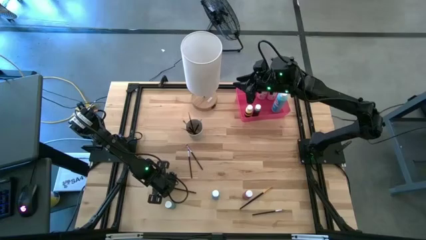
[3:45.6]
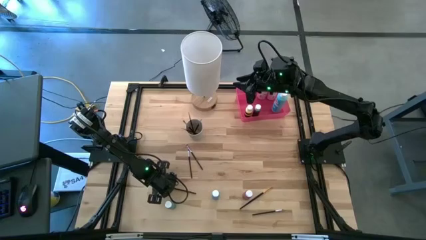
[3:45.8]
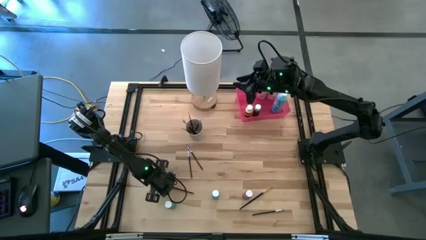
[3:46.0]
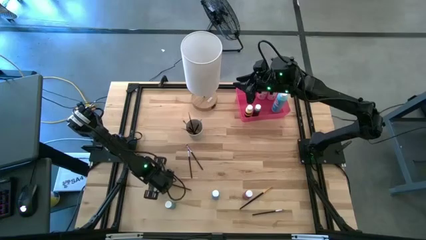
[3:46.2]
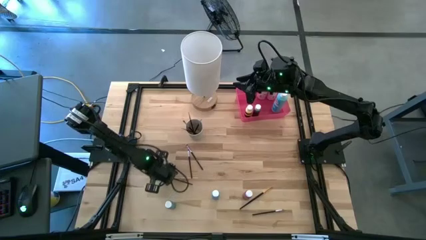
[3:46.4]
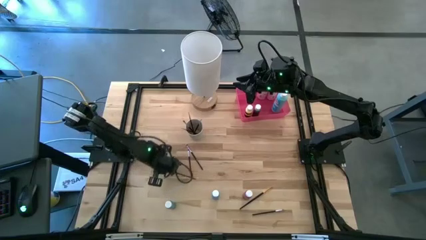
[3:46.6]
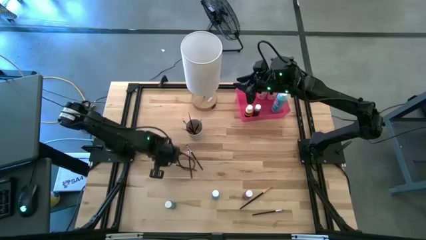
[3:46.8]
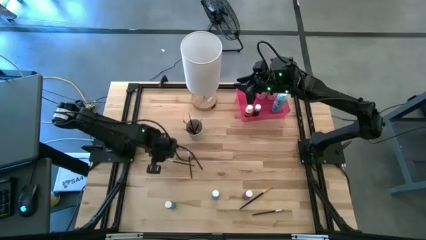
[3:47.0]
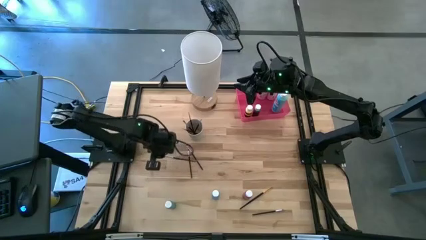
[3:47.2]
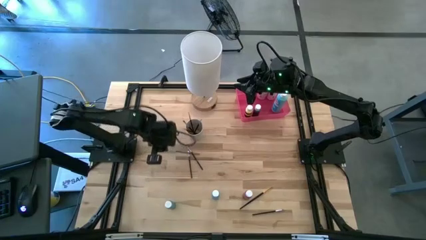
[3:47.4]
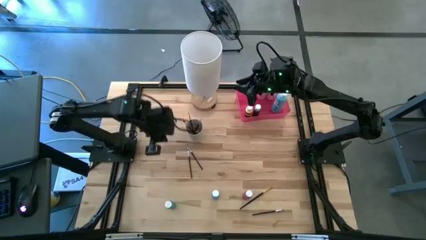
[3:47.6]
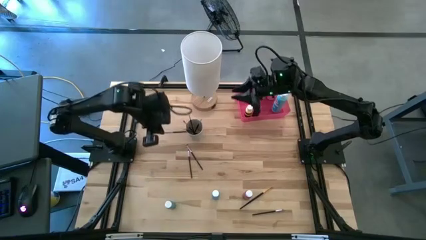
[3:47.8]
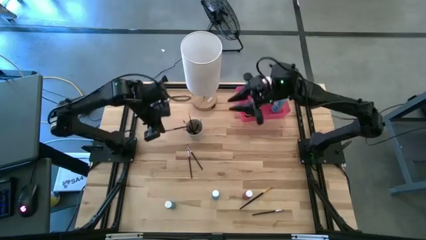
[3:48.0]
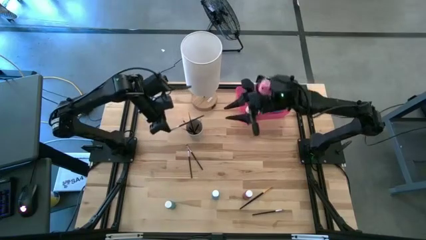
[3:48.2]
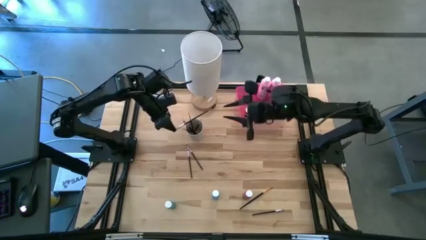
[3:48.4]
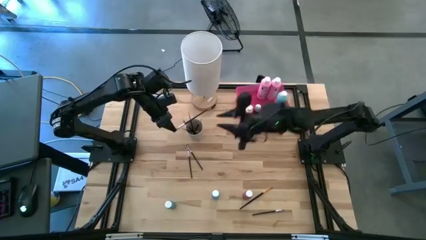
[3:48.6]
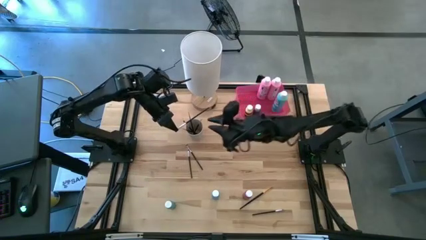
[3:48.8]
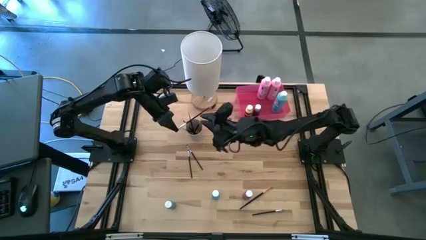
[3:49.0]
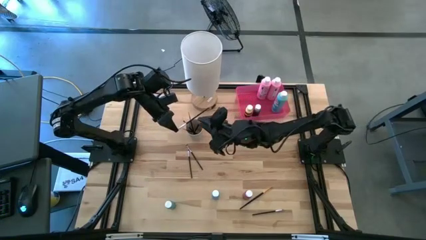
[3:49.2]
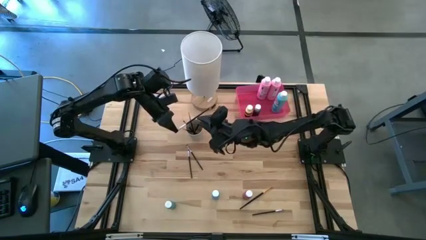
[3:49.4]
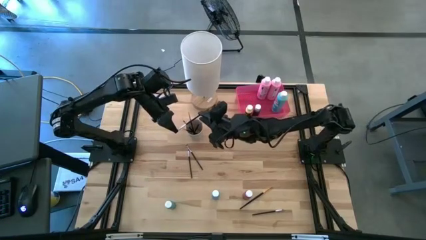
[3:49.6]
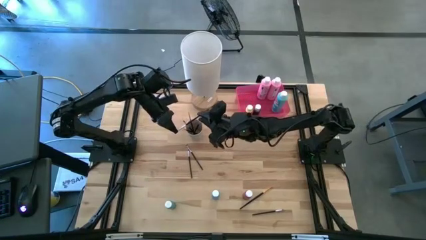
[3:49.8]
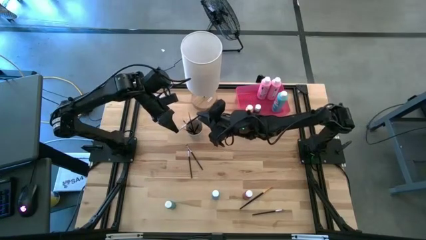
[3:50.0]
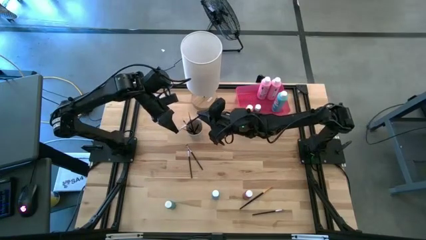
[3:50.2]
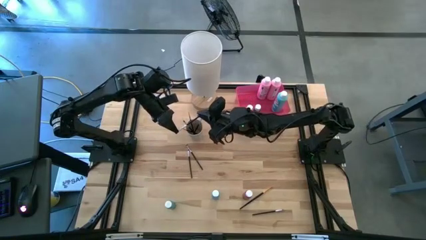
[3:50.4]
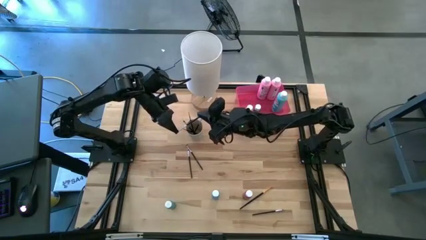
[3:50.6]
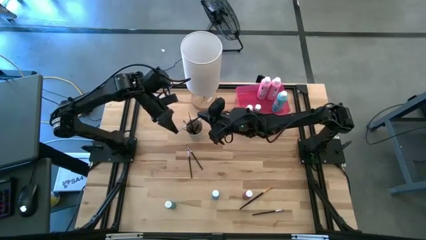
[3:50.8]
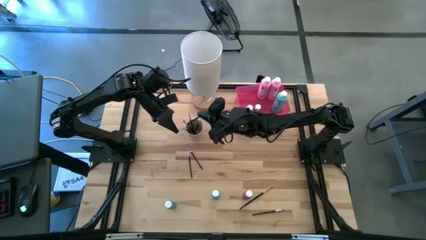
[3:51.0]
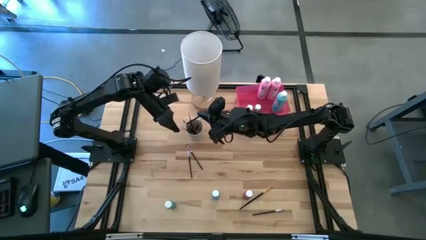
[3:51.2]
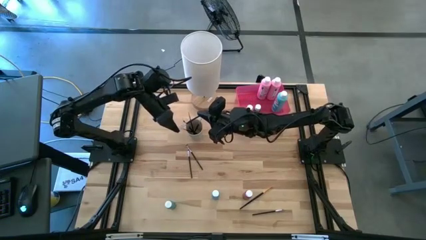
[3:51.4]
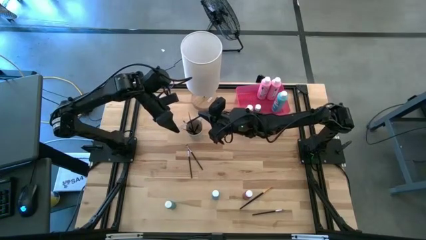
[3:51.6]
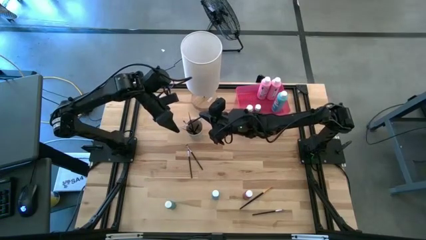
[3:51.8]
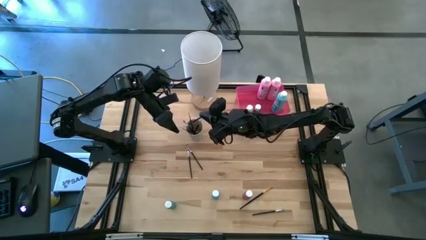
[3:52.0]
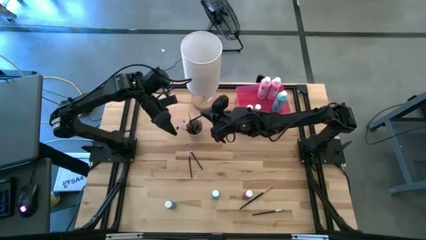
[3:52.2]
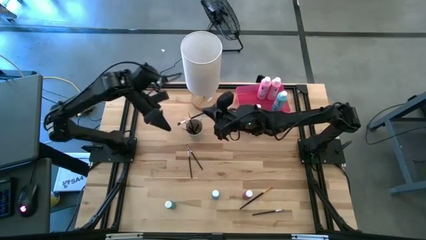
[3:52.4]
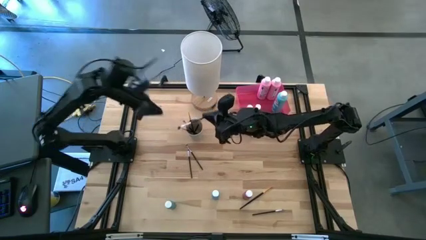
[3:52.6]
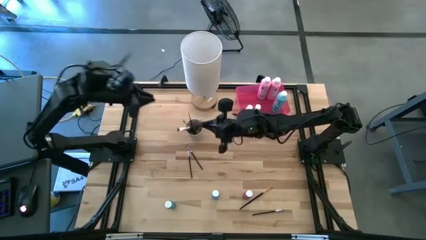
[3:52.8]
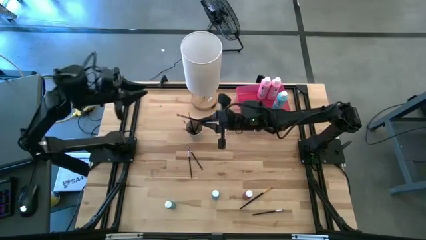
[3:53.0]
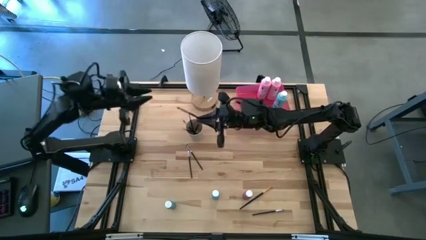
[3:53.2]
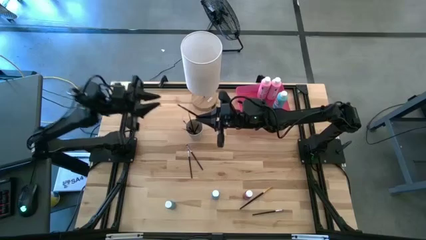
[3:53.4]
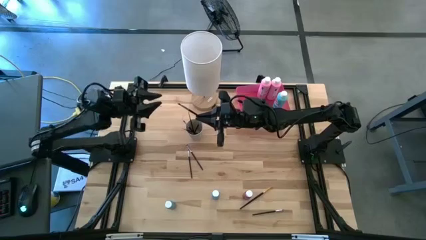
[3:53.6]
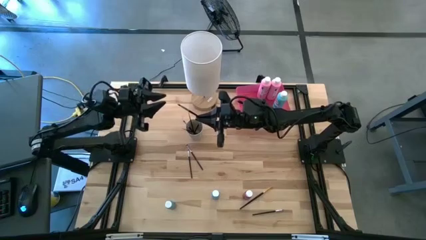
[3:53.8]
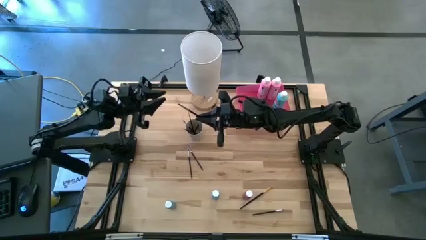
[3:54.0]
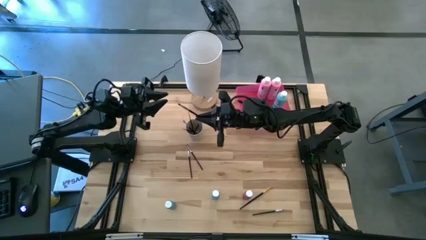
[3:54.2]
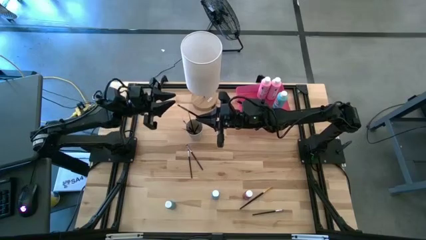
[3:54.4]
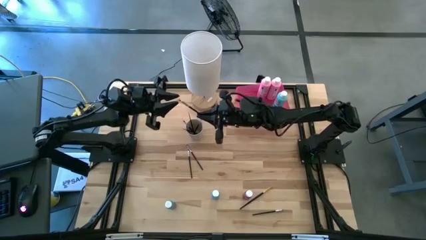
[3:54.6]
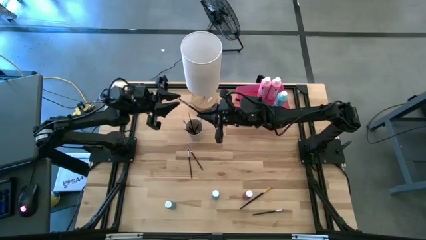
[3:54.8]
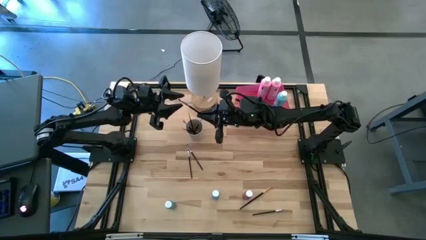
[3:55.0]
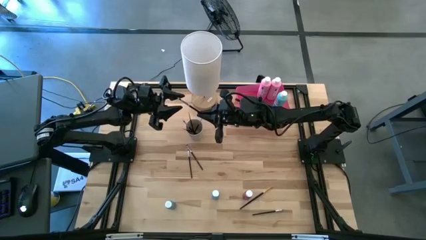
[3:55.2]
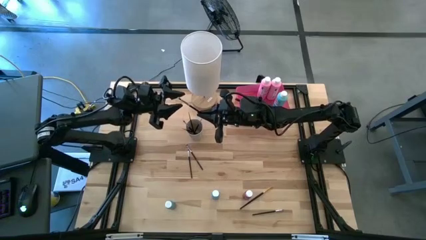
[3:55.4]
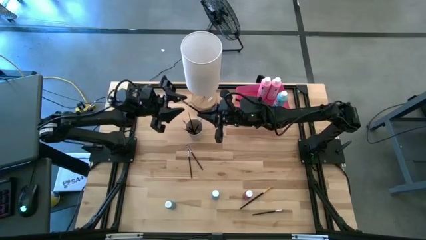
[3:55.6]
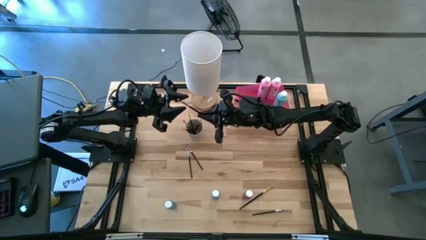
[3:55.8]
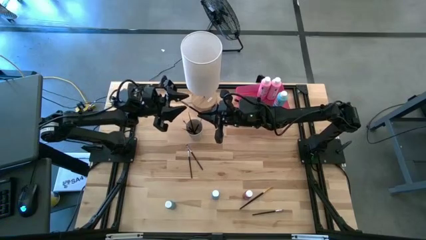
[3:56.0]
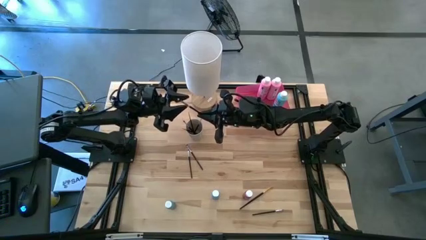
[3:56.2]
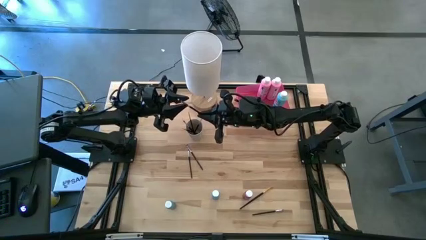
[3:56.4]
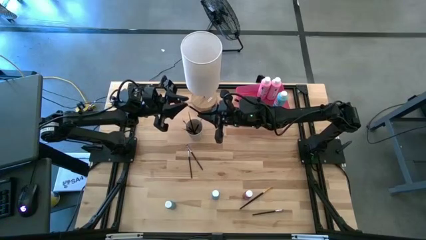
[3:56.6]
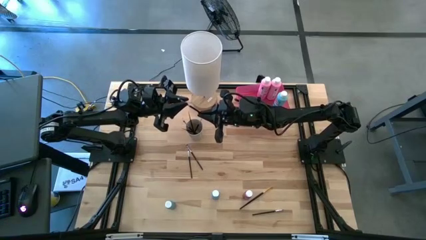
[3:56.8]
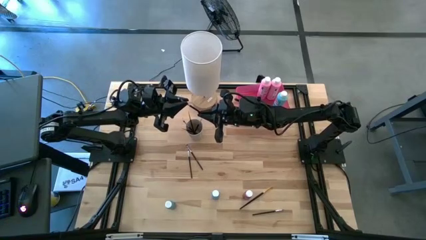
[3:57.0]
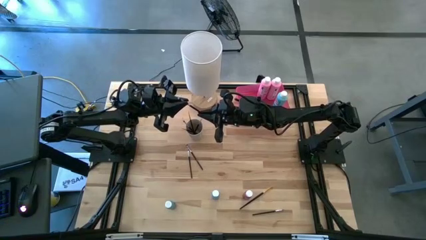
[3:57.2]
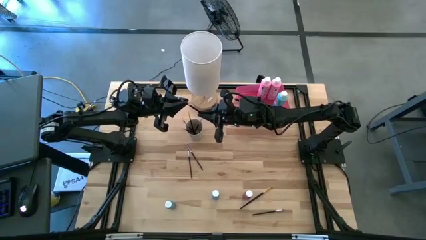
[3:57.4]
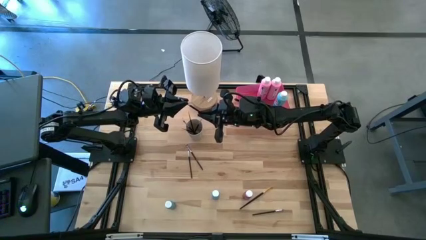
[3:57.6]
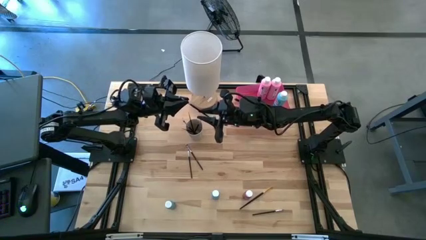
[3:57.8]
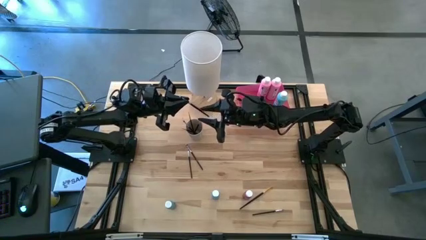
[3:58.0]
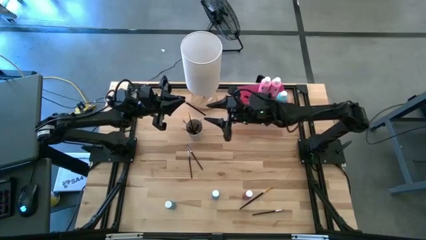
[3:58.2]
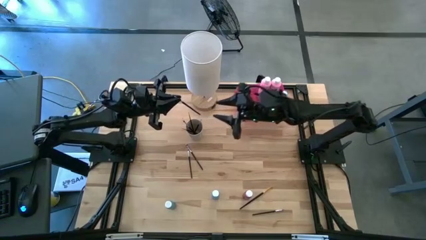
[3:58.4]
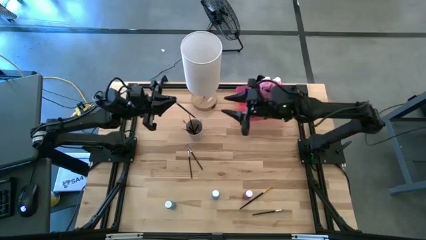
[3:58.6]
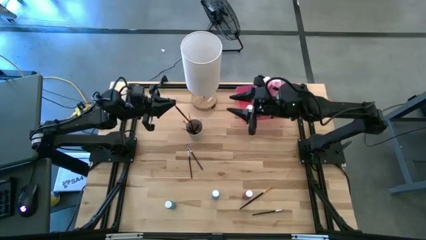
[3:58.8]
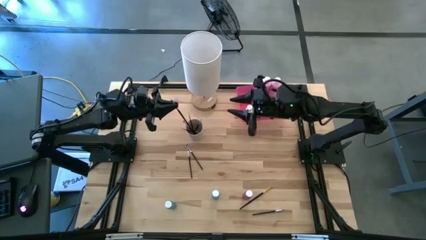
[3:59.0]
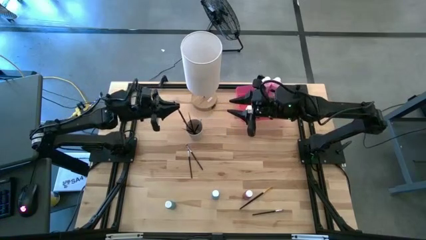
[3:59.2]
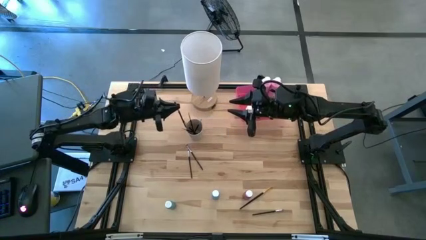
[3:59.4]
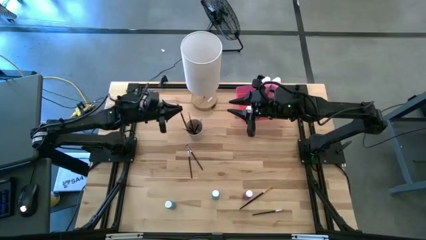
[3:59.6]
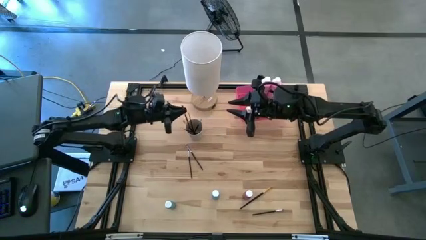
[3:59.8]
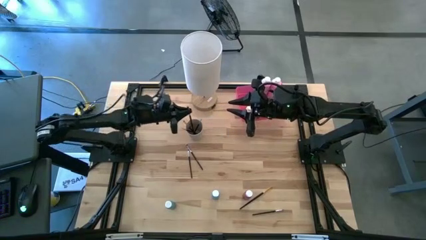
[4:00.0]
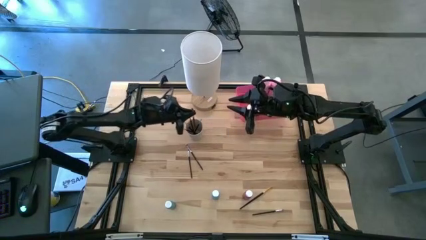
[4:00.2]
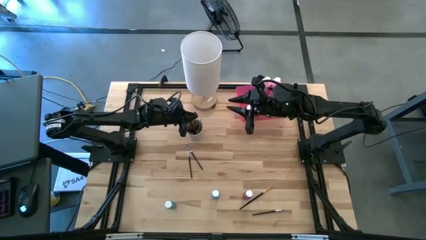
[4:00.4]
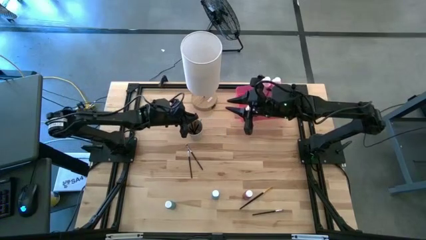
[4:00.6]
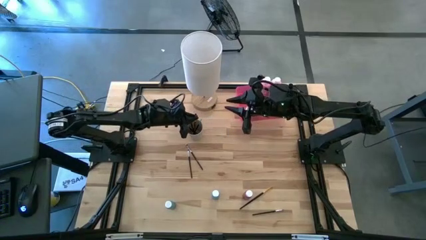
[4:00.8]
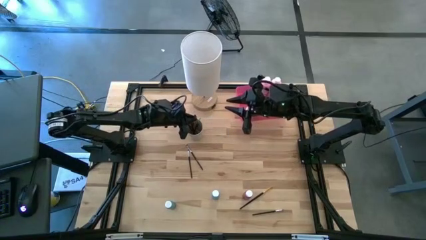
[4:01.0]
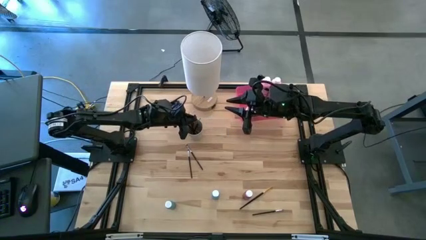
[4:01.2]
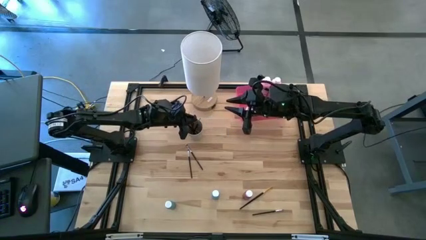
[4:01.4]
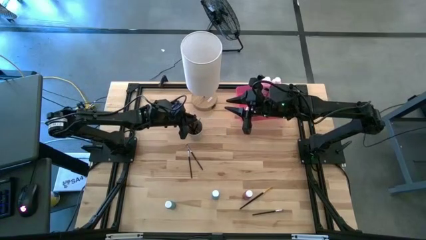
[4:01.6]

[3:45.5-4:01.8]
Task: Pick & Place Paint Supplies
Put the silver eyeshadow brush into the white cup
